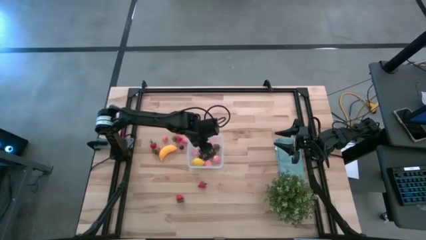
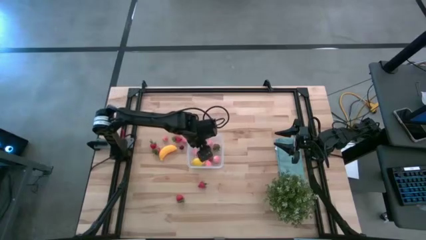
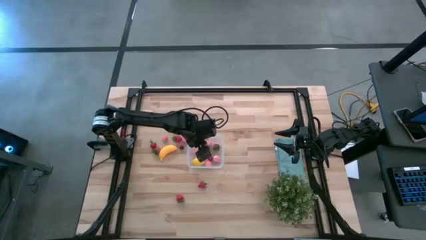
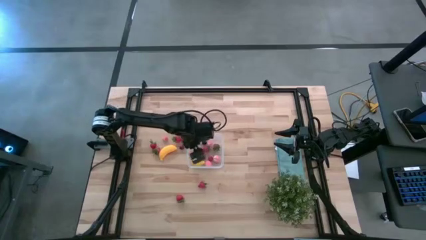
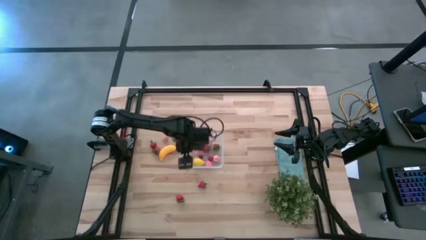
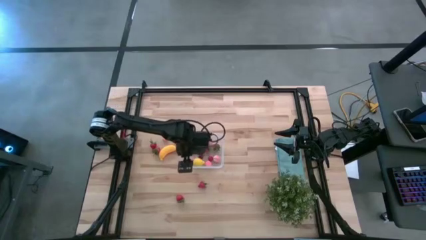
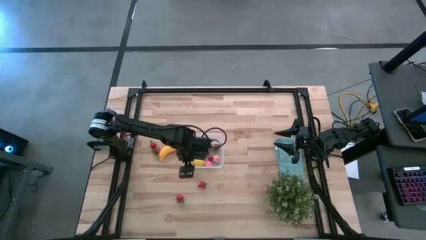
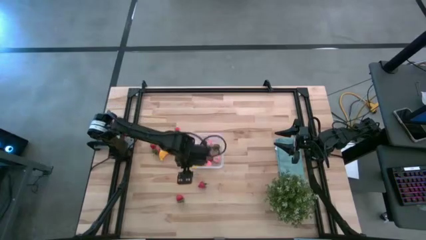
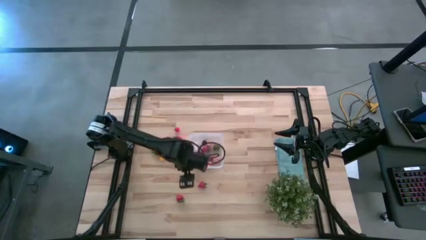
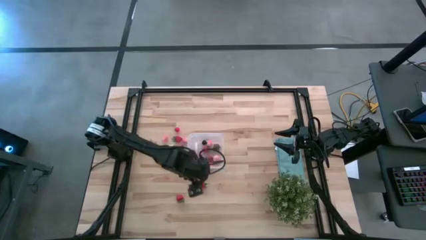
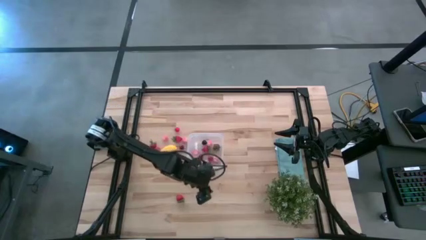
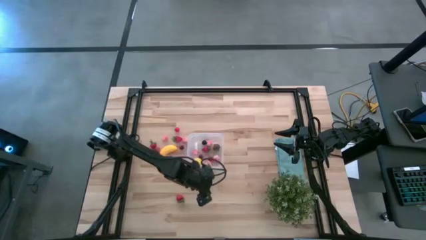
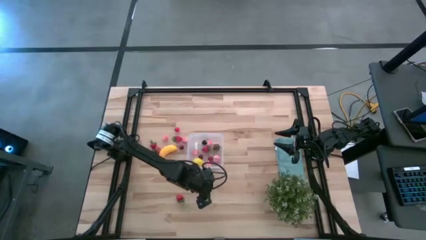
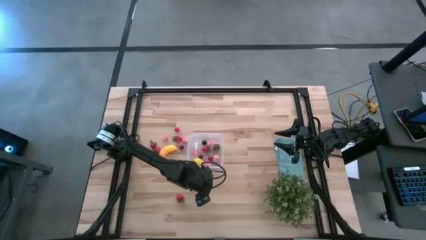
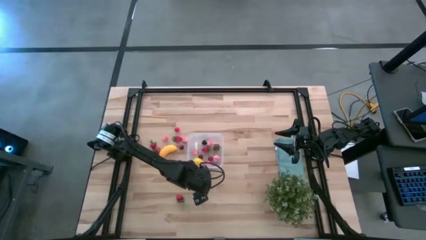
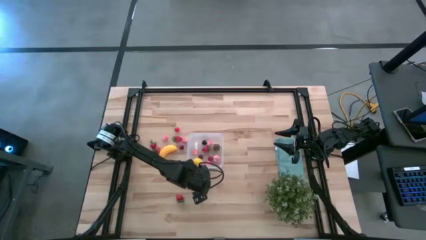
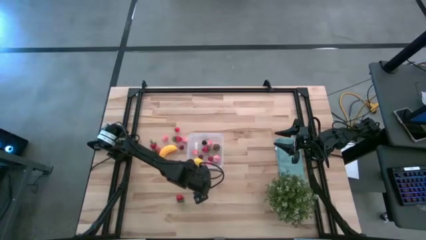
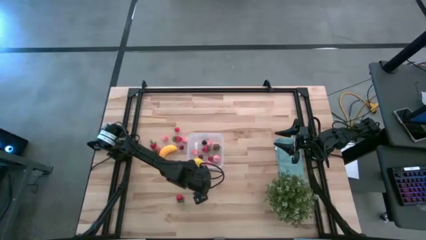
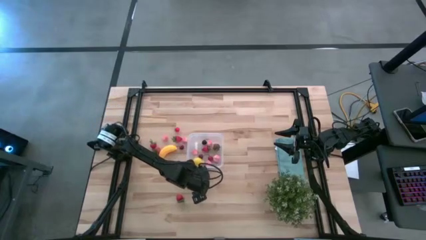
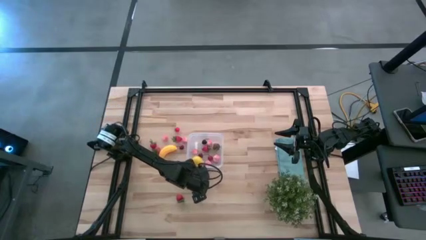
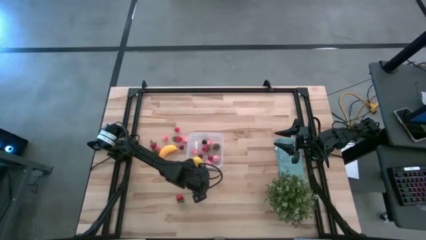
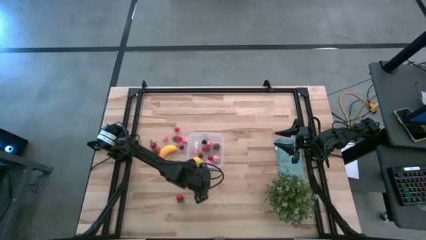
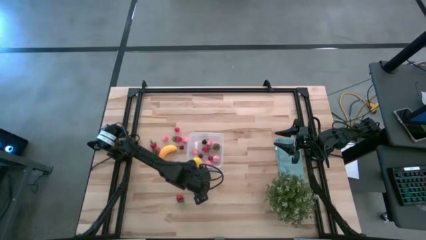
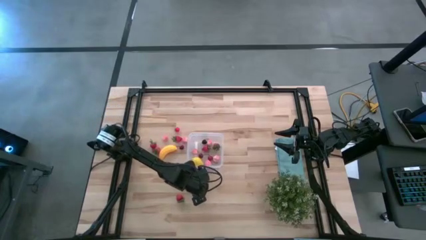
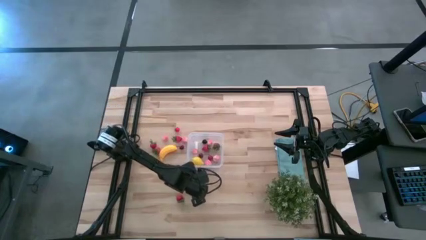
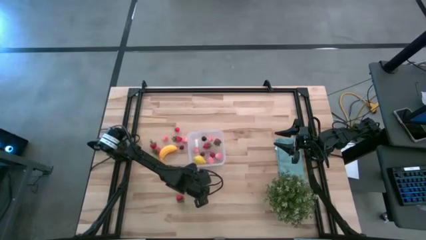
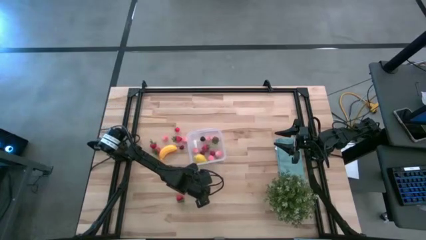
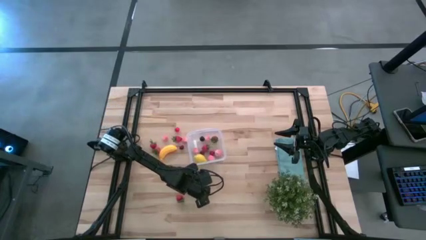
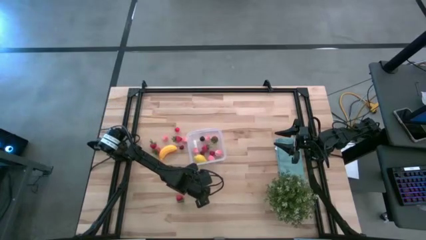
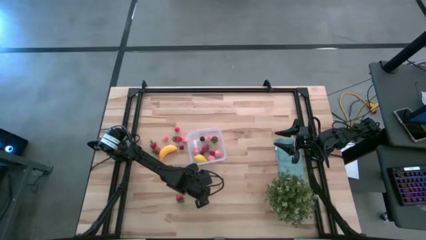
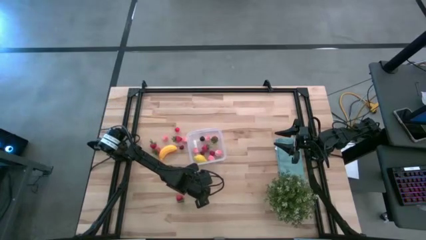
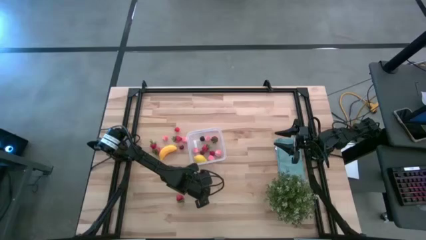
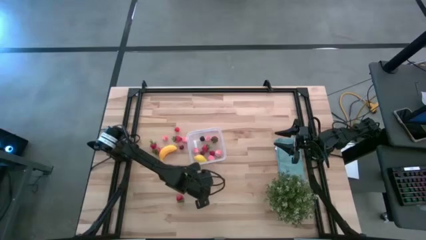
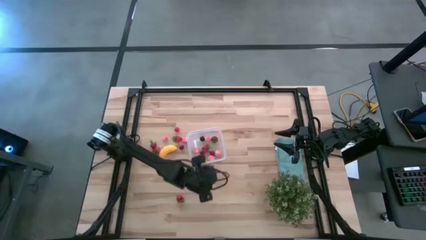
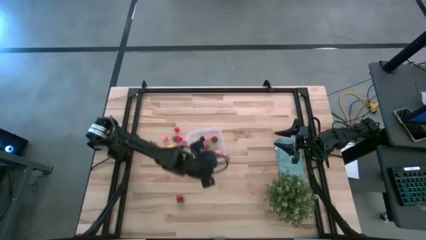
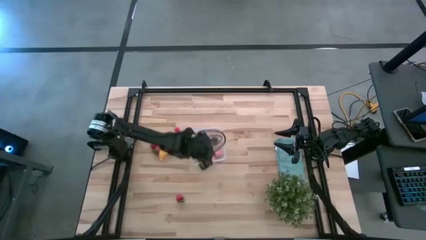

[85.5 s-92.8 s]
Task: Pick and placing Produce into tupperware
Put the strawberry into the transparent bin

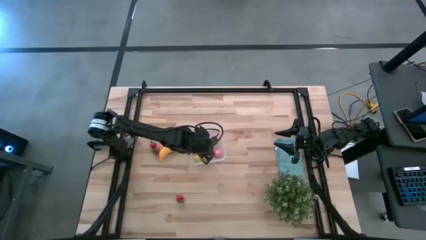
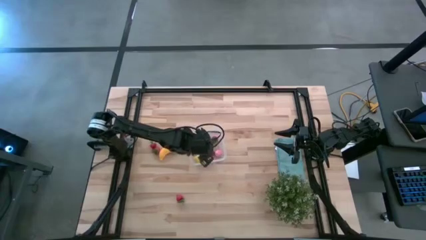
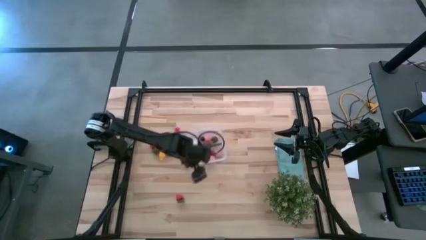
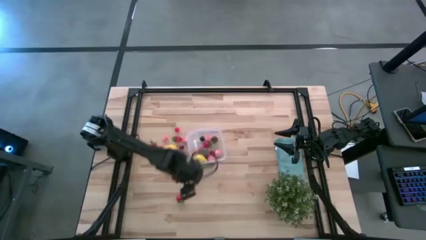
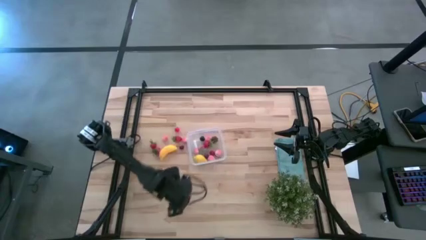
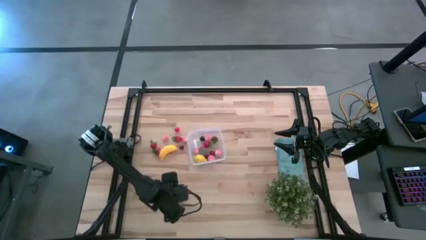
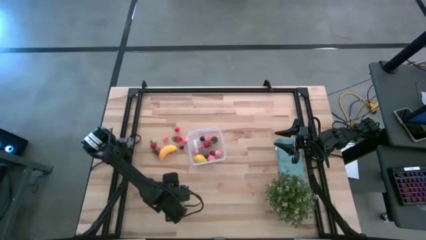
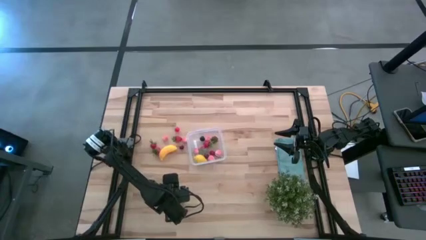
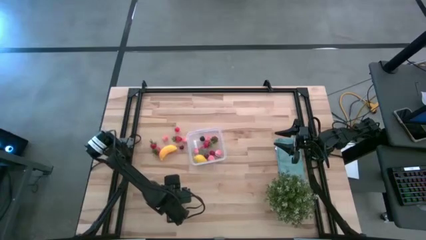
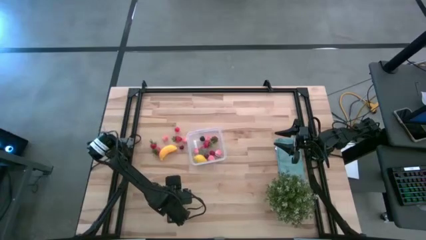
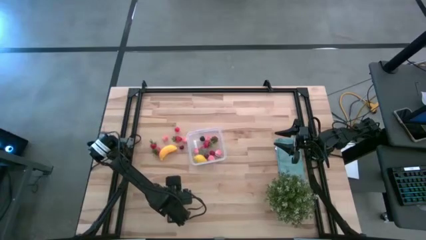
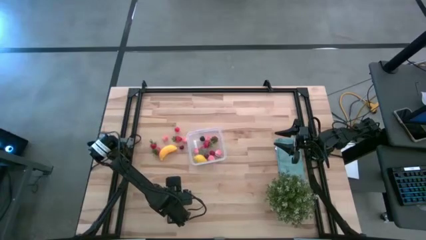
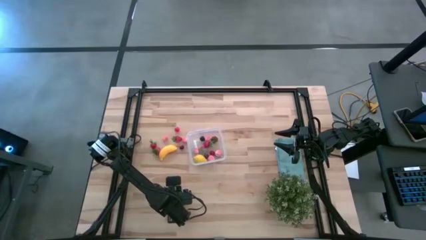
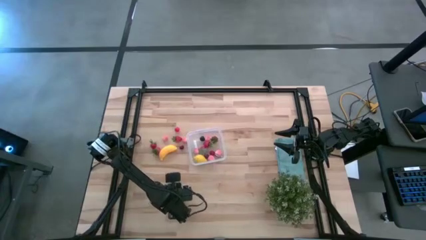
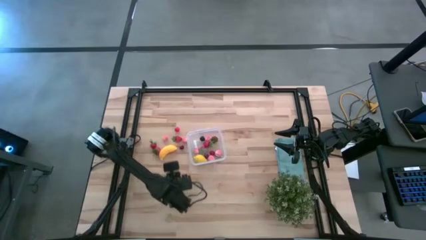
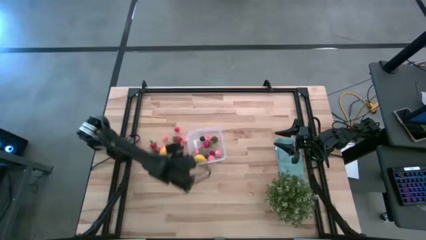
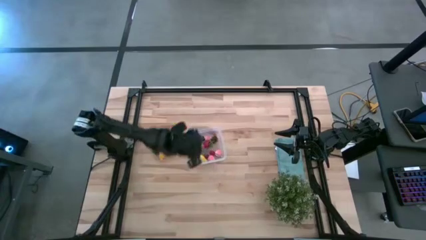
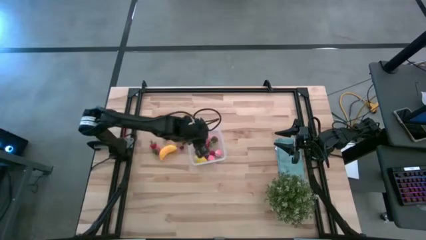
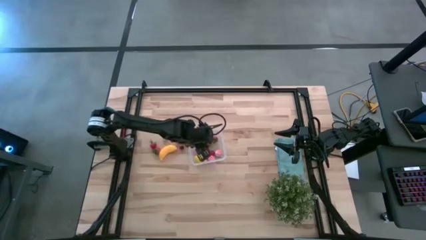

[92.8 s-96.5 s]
Put the strawberry into the transparent bin

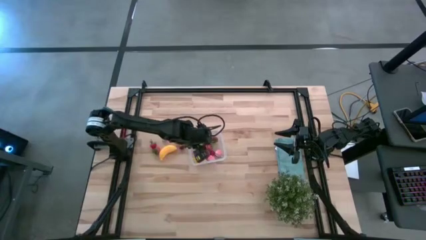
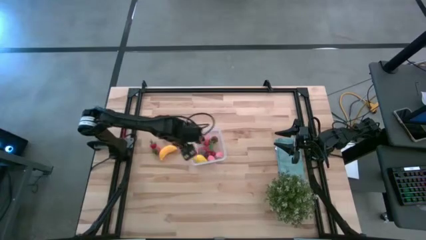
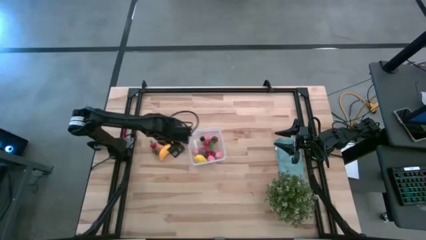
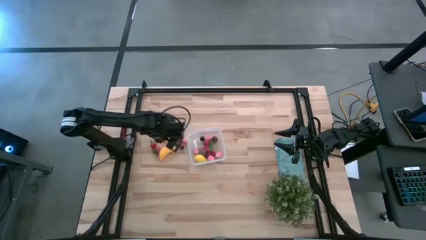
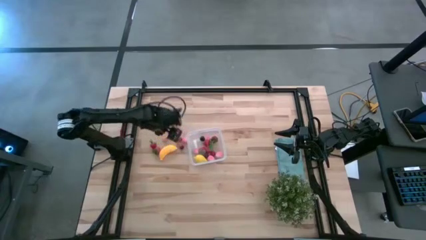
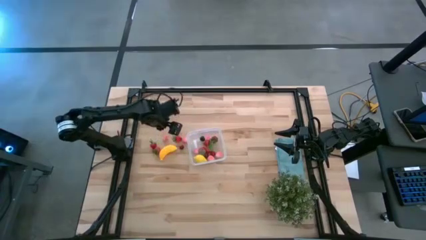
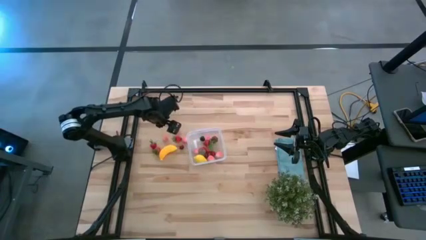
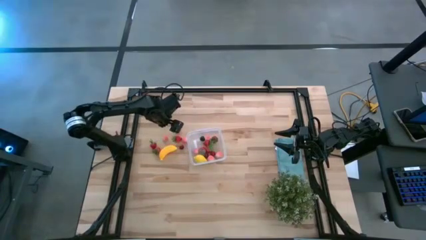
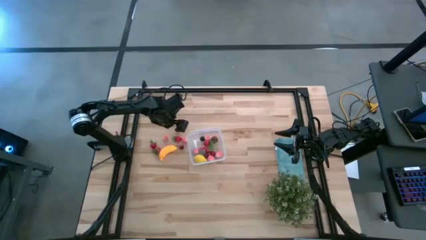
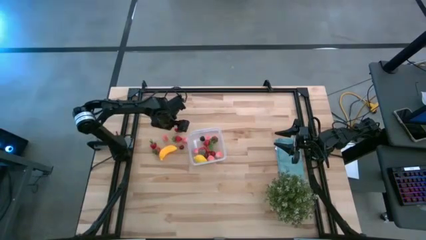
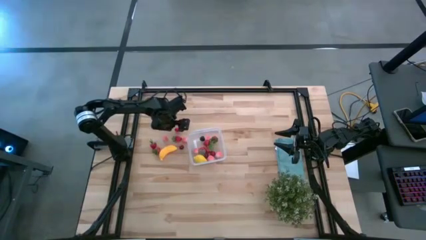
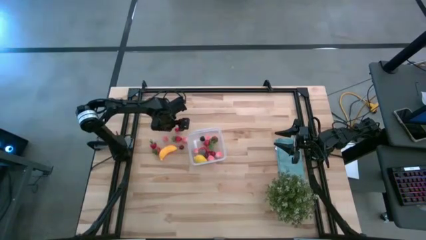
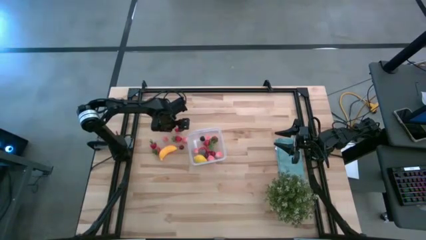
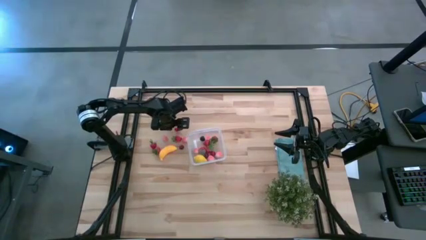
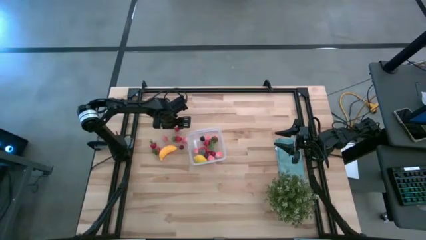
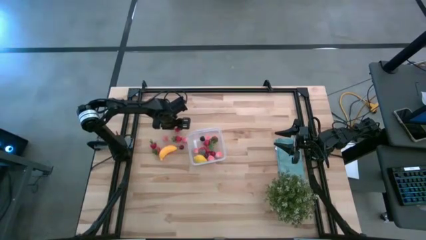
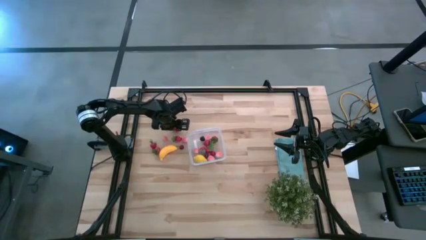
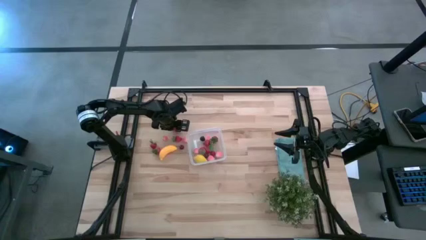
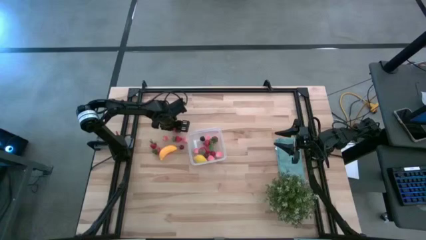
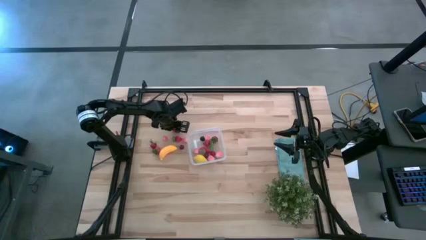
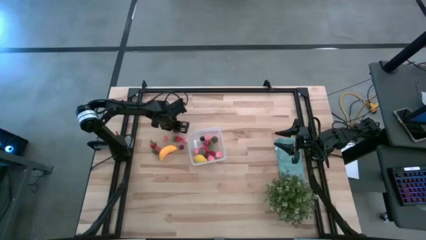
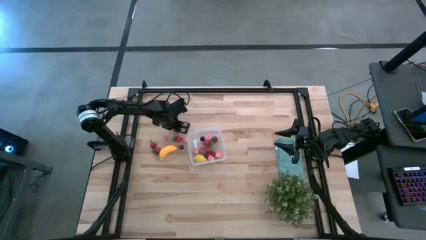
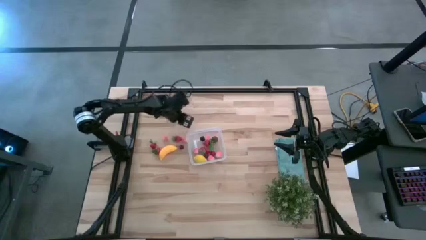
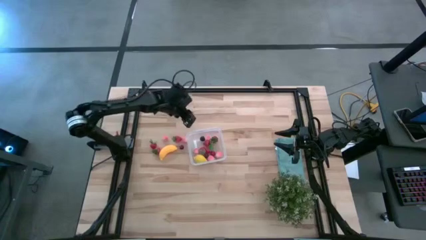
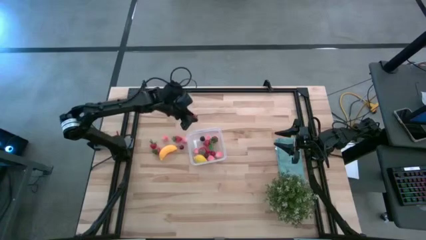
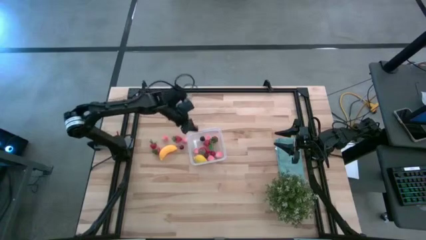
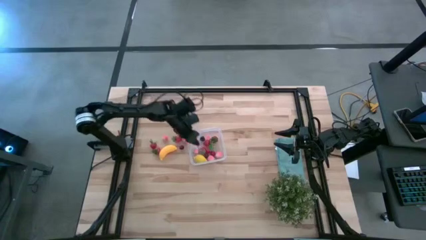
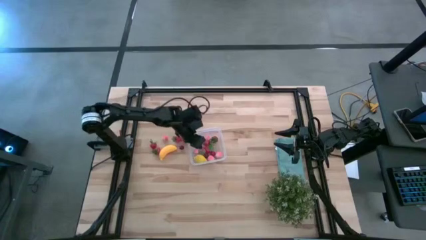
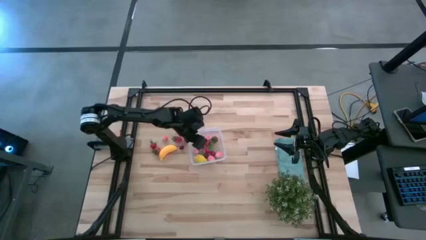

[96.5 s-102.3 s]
Put the red cherry into the transparent bin
